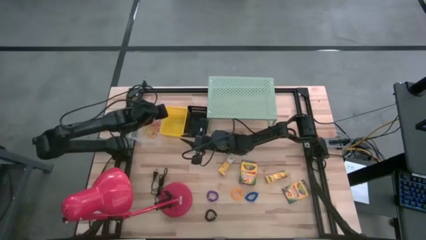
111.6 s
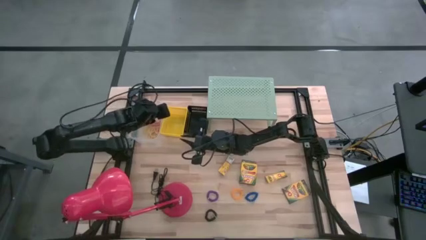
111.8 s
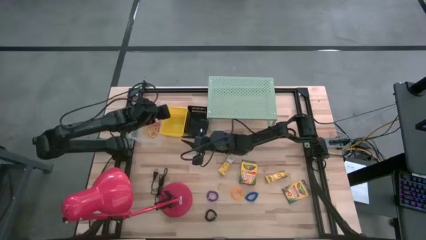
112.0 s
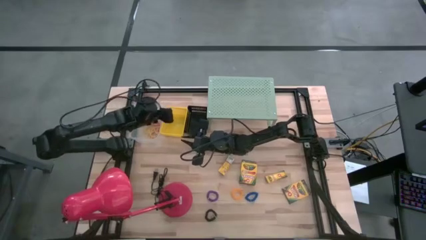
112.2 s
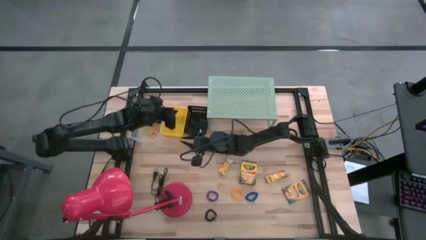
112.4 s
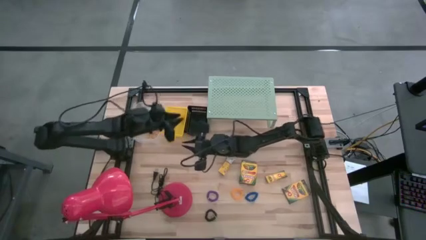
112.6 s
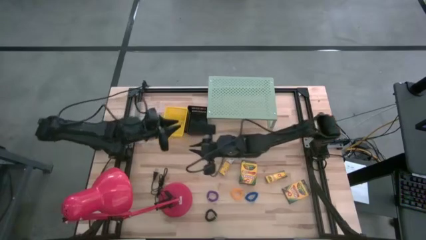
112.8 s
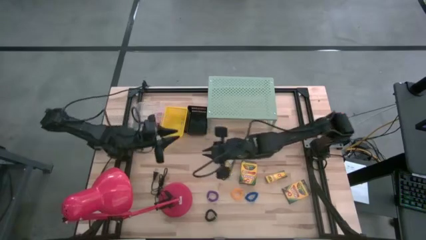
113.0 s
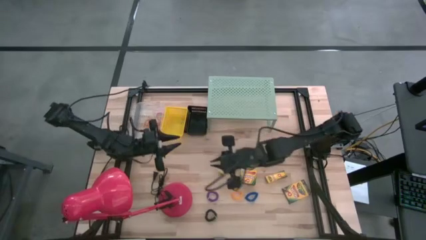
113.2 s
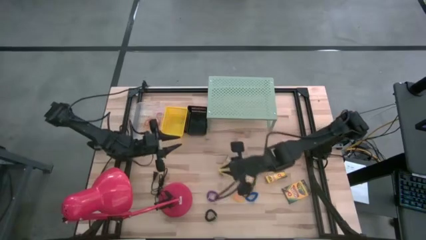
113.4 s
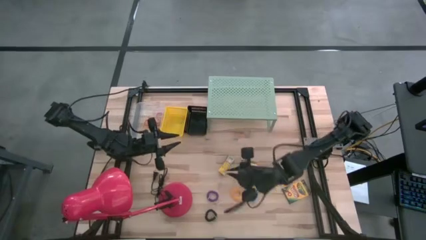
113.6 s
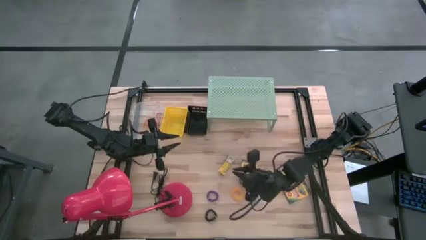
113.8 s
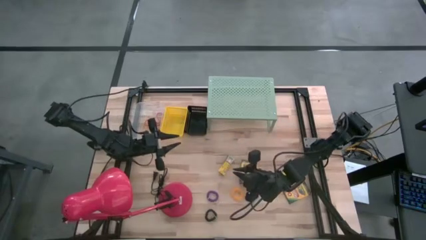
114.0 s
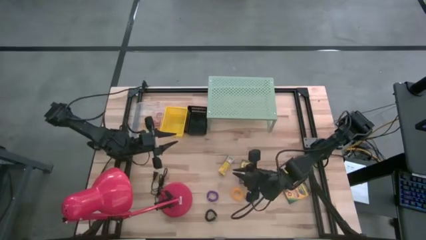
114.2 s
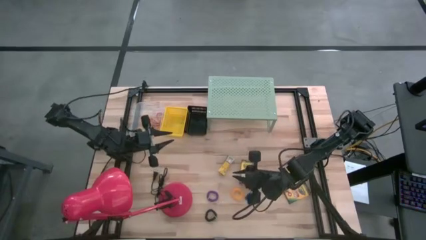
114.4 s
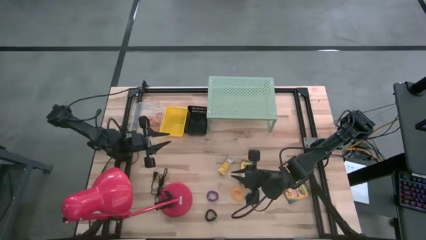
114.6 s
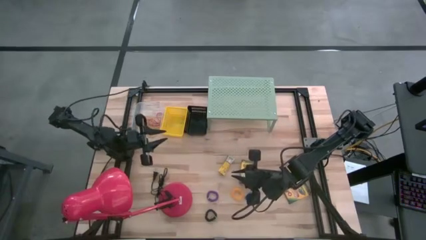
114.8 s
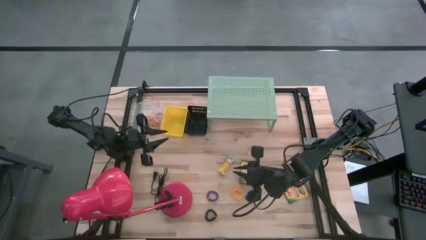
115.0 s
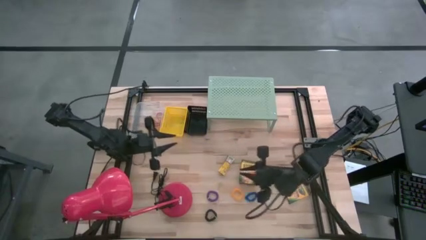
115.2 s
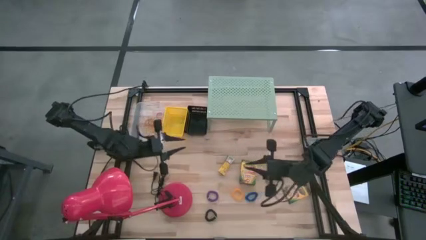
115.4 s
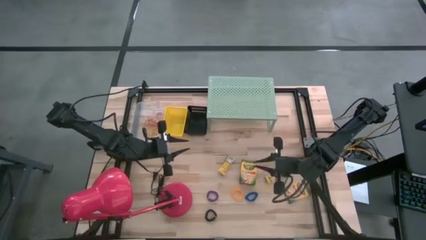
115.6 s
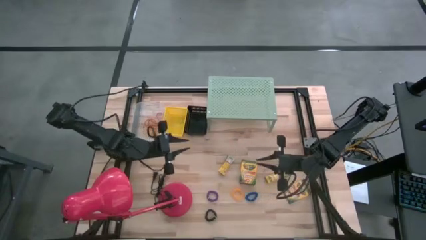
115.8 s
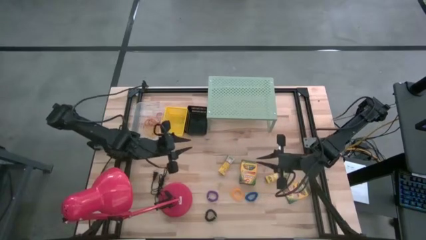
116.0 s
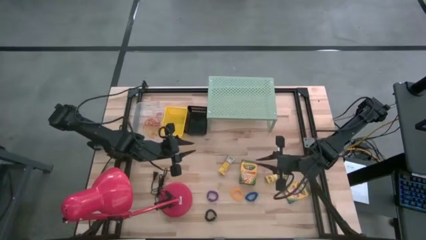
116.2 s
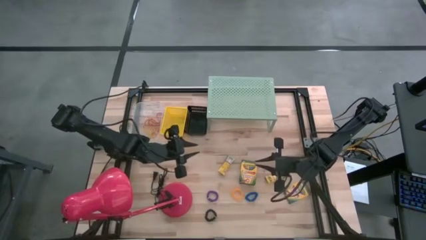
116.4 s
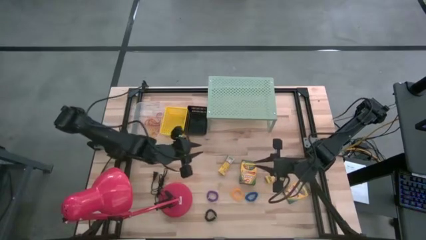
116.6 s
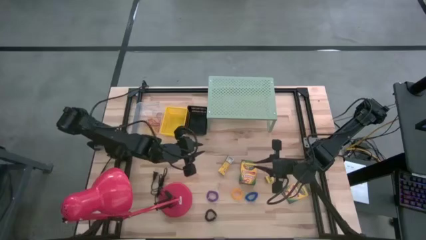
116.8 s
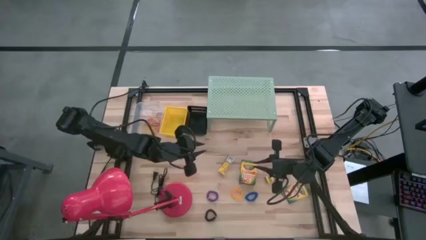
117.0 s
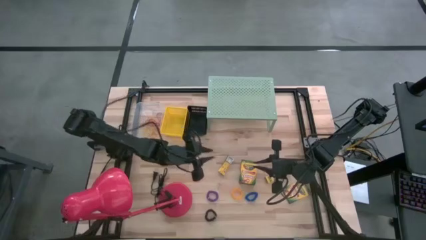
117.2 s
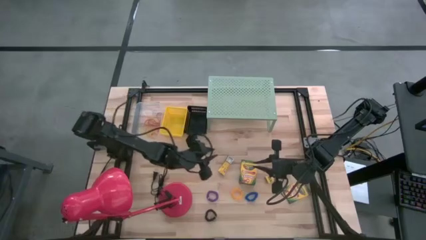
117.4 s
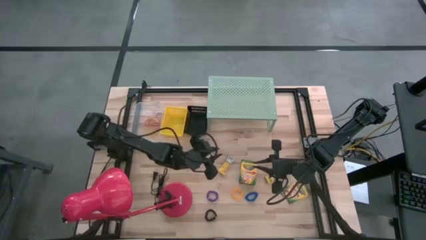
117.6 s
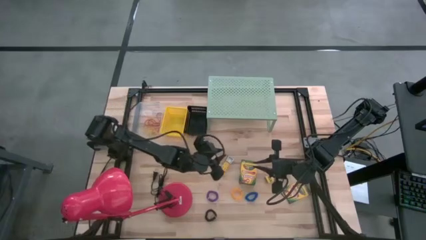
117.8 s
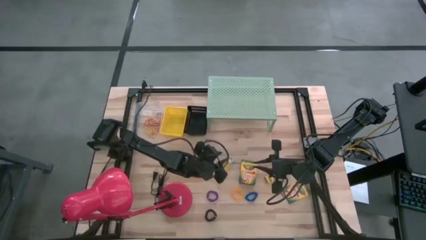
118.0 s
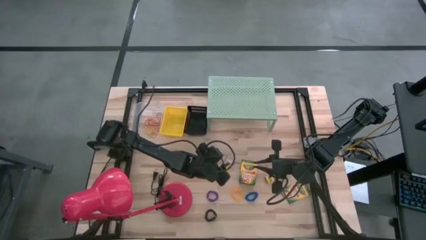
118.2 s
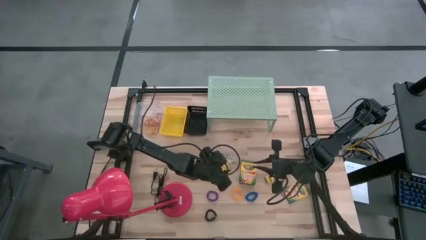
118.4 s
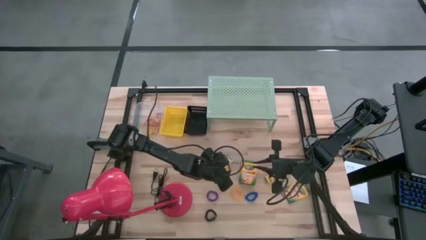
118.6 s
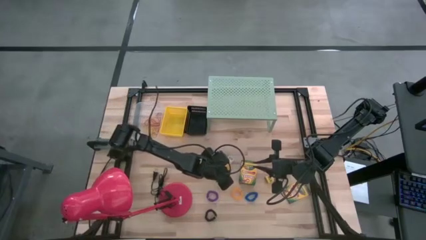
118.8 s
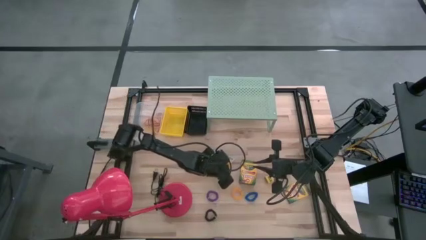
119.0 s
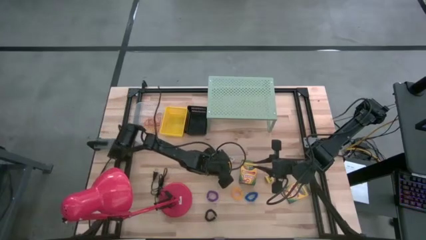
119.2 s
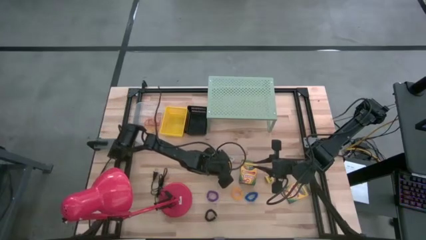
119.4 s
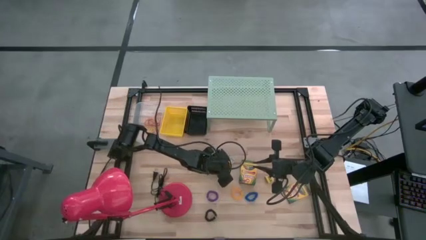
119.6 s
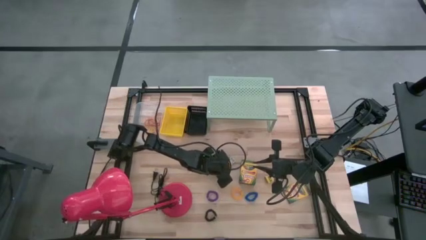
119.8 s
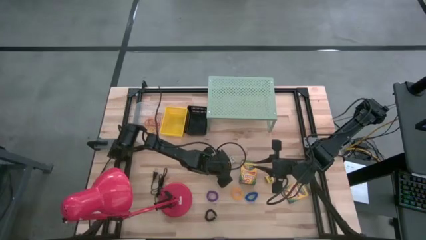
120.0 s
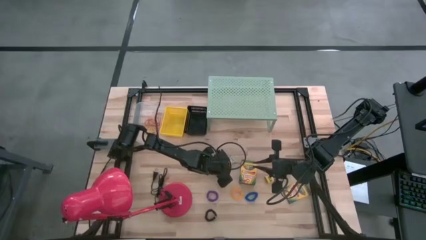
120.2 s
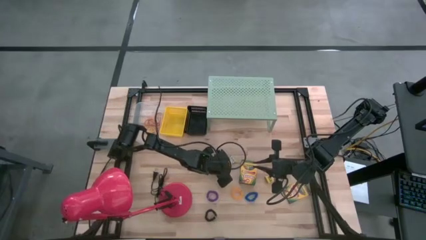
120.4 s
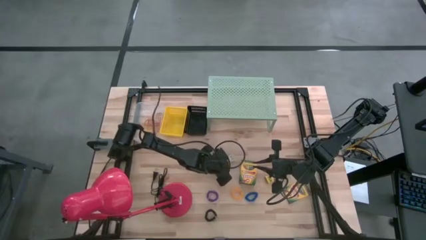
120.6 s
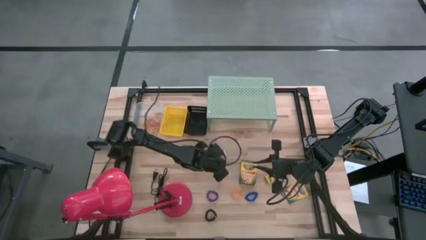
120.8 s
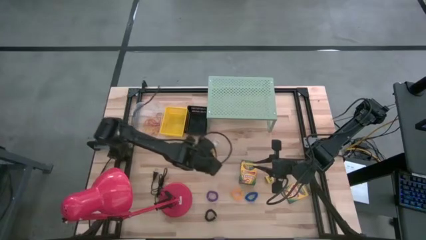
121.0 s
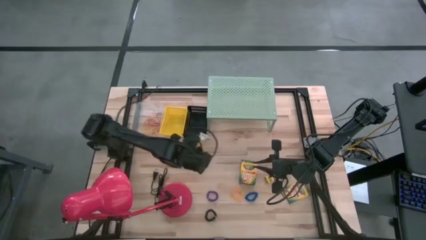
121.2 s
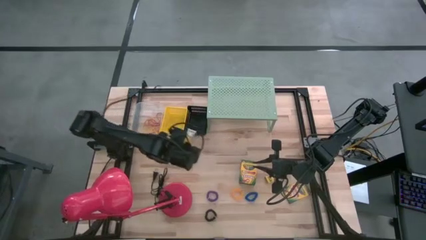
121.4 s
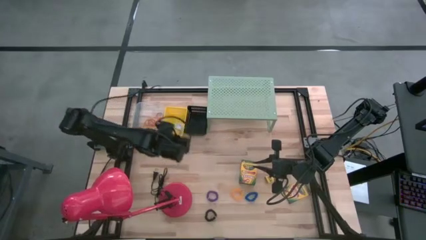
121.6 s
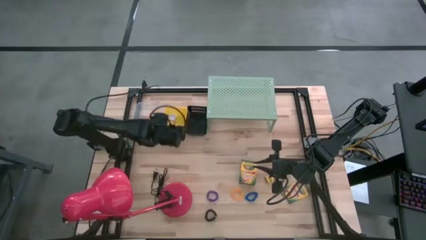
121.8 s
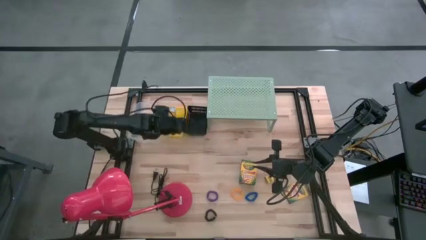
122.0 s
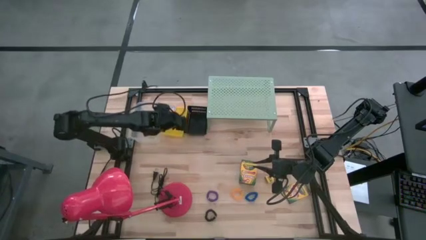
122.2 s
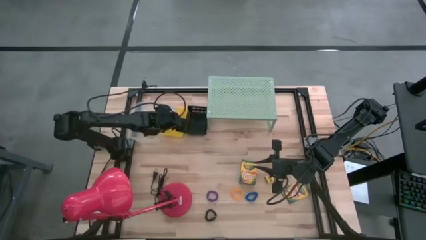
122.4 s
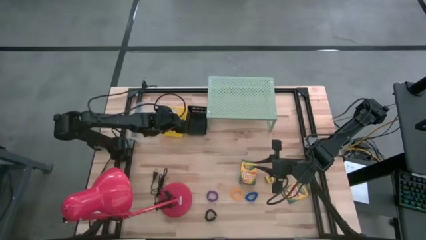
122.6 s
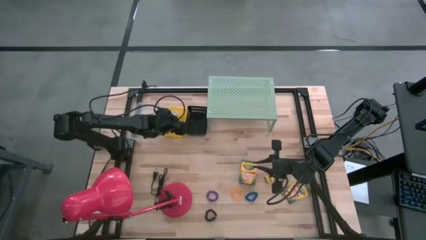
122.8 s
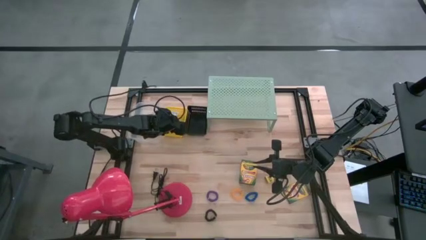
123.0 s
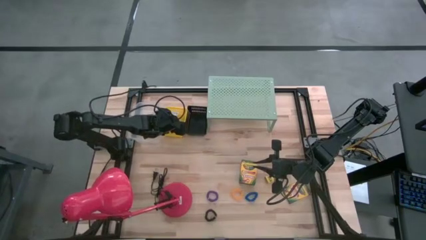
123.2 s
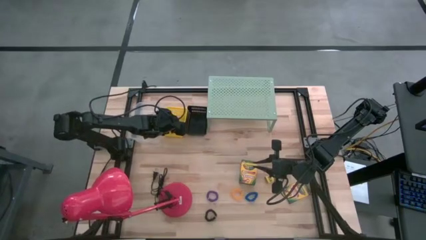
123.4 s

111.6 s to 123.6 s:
Task: Pick & Place Office Desk Supplies
Put the crayon into the yellow bin

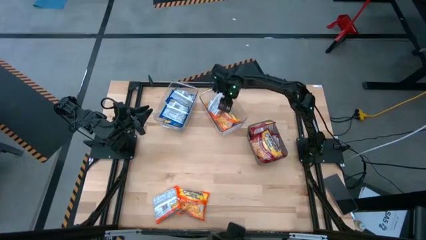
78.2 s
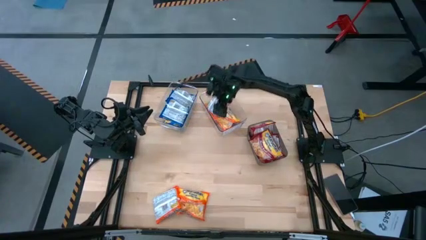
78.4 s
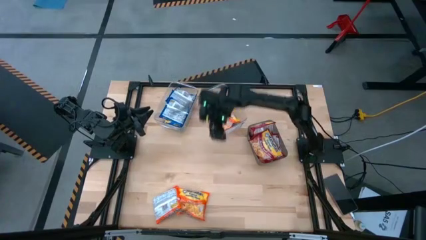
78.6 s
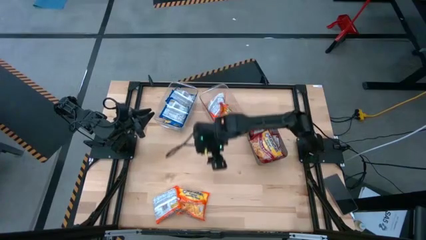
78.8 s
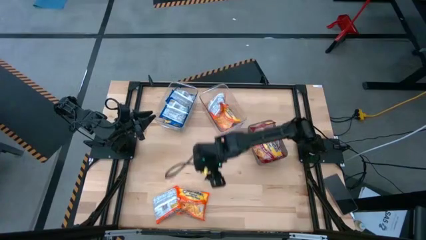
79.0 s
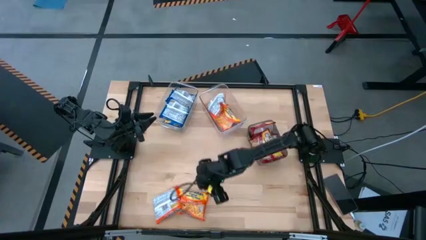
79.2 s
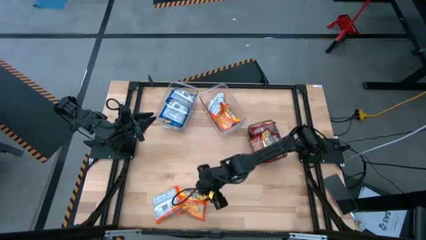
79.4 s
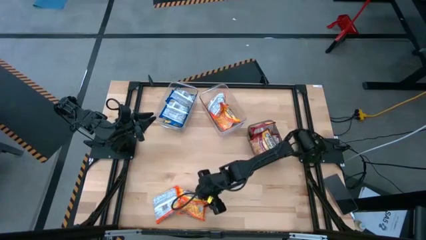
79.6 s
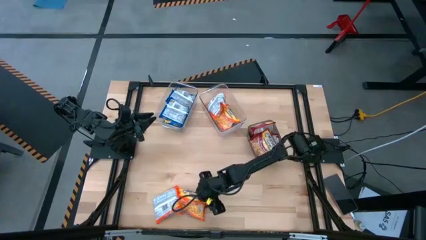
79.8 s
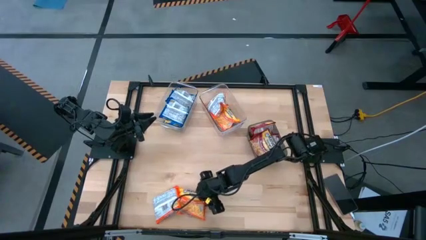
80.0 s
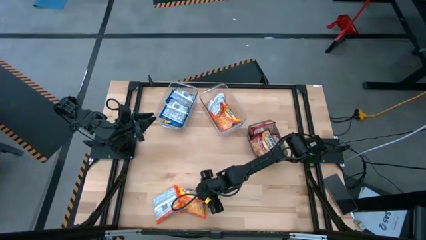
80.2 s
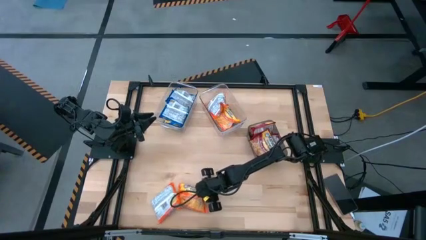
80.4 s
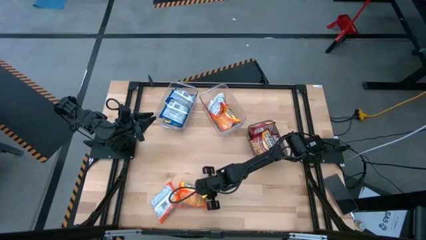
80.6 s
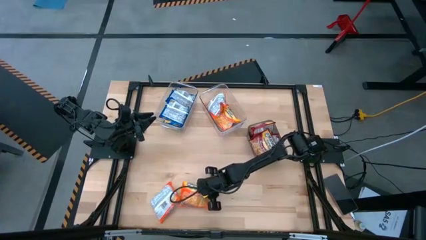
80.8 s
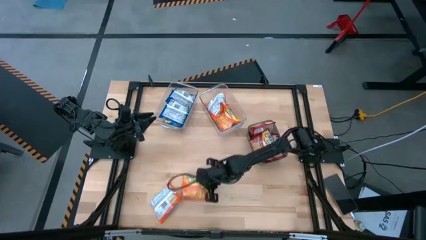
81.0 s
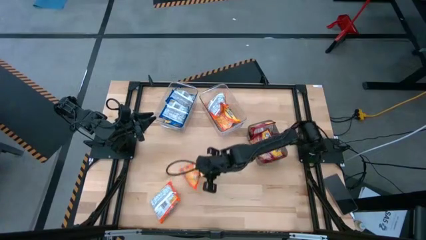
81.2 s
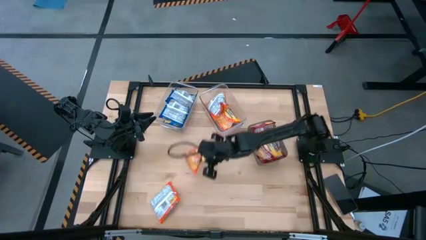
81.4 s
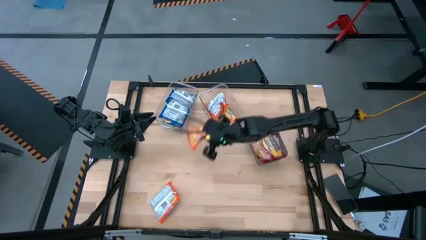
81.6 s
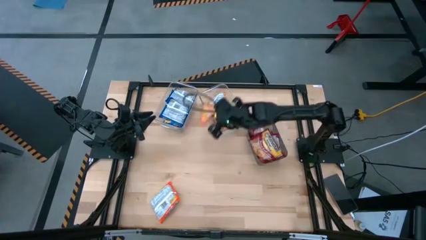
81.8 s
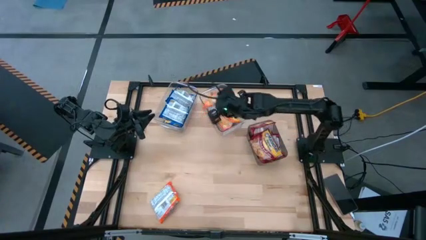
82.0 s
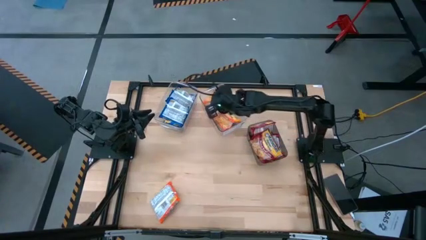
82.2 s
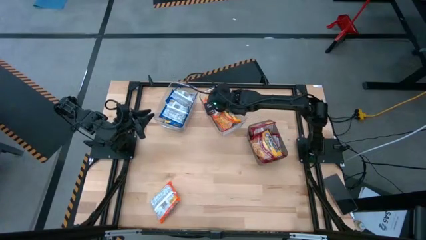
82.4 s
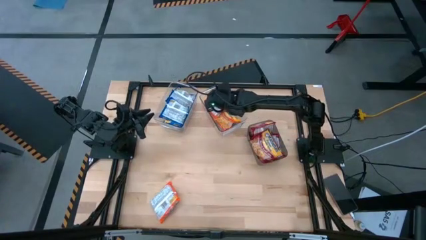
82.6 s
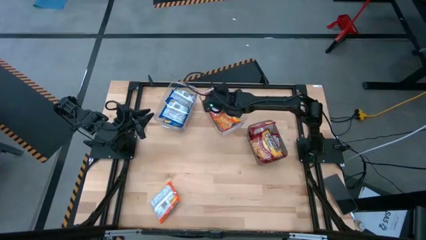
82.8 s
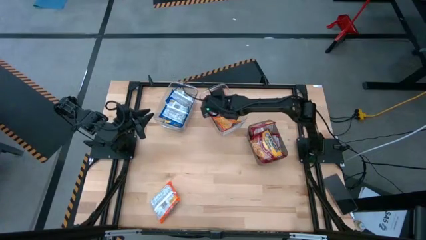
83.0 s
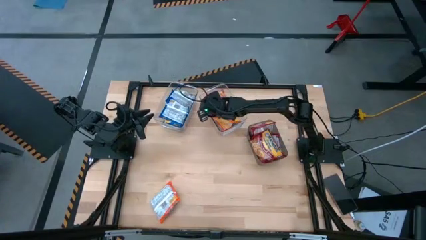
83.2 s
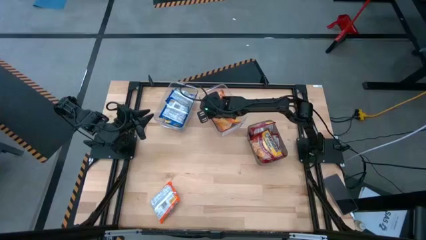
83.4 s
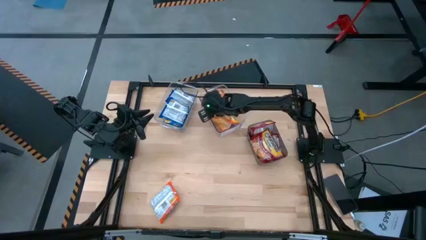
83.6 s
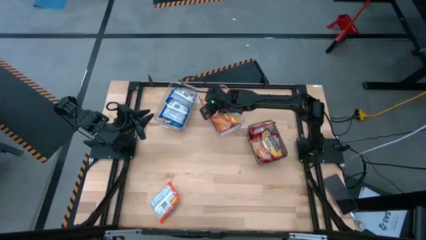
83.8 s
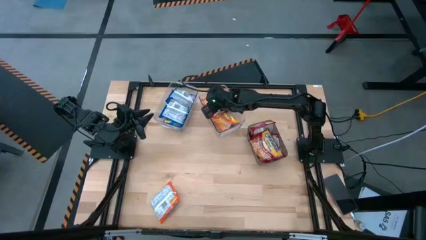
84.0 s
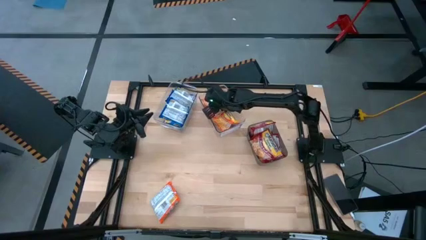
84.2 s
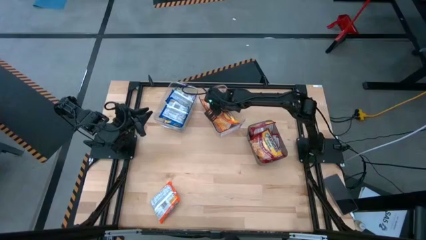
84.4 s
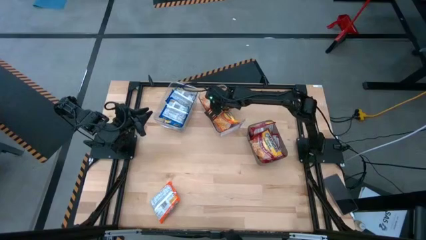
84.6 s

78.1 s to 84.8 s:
Task: Sort Maruchan noodles
Put the orange noodle pack into the right transparent bin
